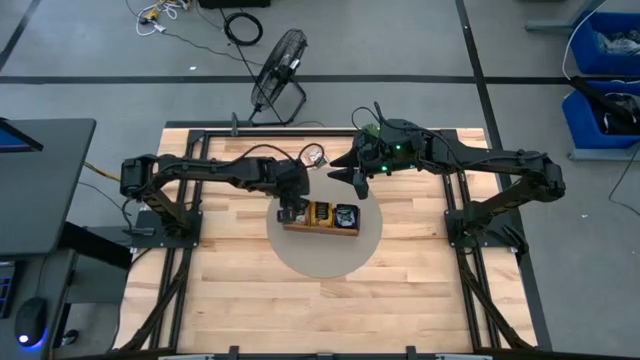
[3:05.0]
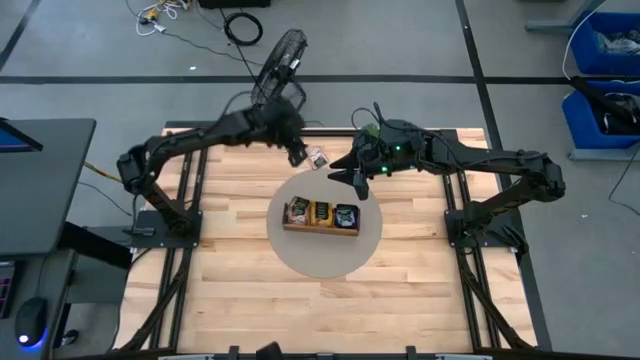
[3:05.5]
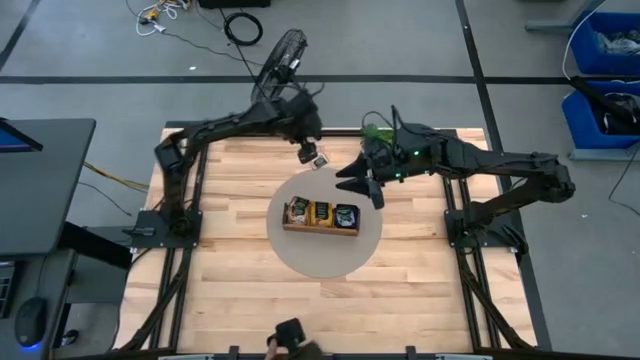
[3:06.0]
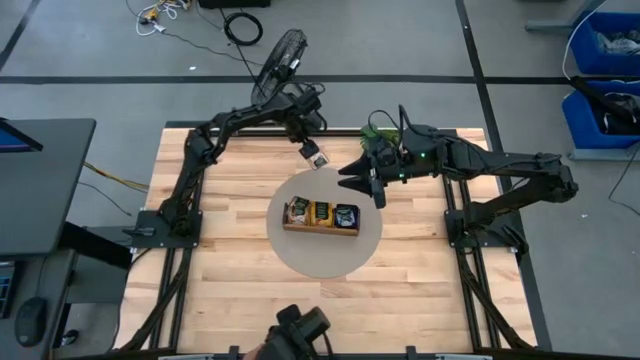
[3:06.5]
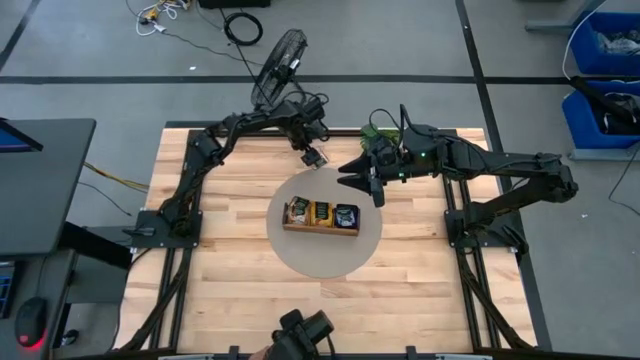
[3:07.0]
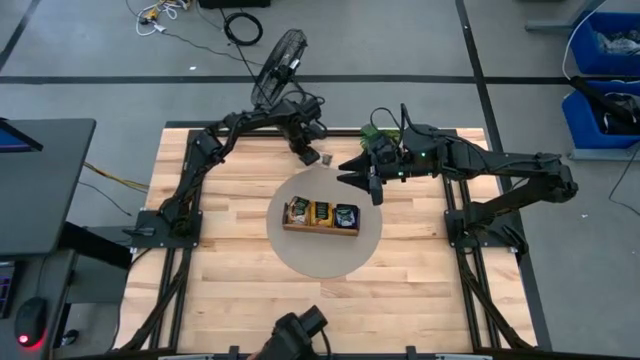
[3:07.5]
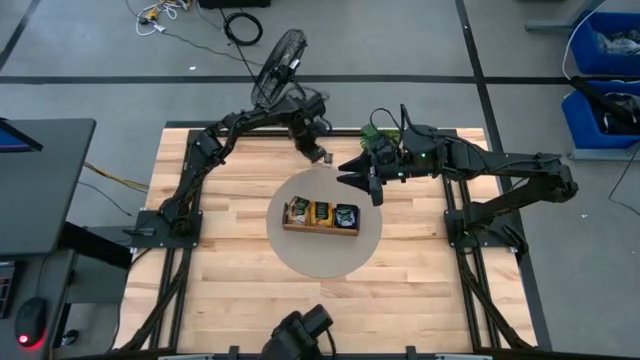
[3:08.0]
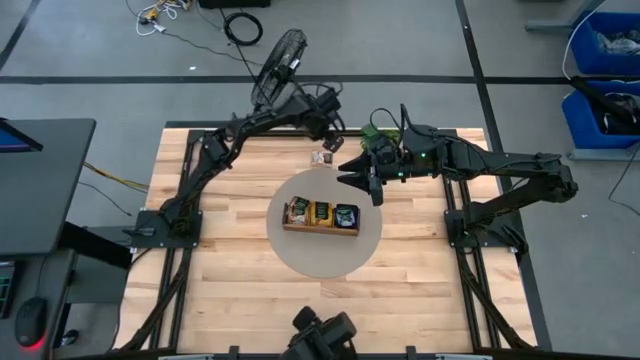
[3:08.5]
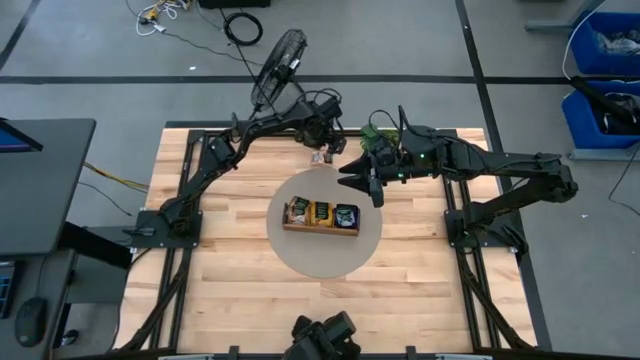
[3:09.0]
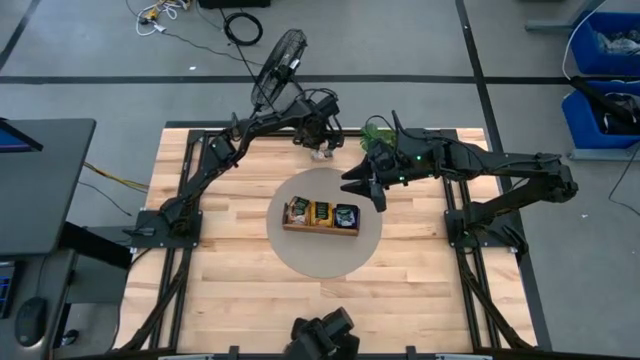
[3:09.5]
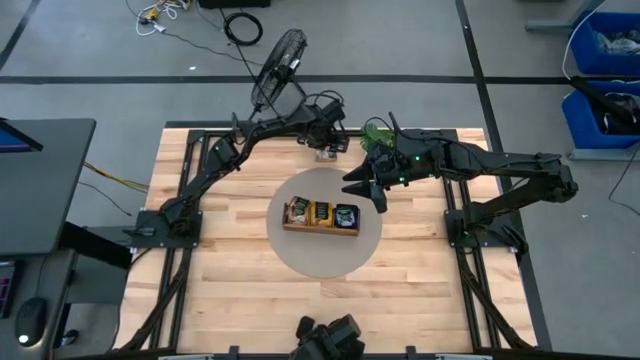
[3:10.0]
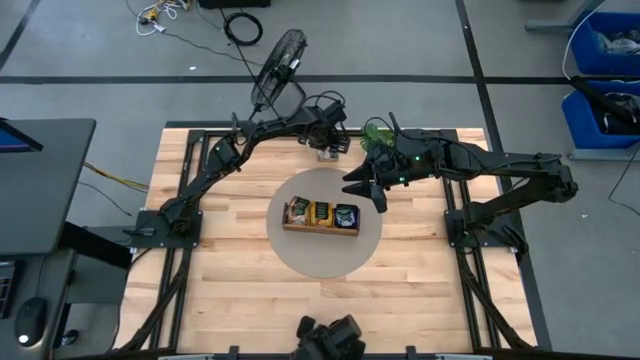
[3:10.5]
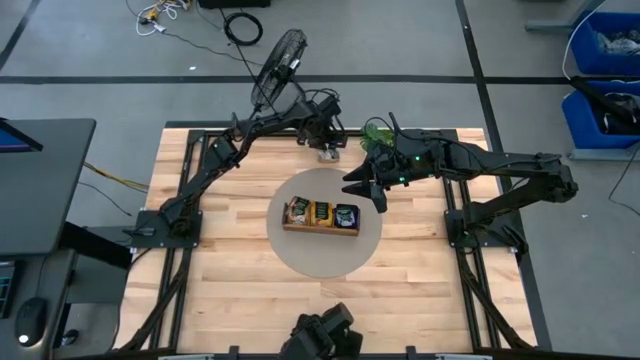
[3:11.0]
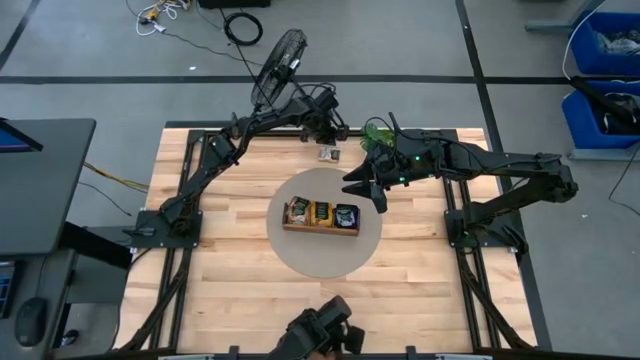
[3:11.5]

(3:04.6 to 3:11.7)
Task: Pick & Place Tea
Put the brown tea bag into the left section of the wooden organizer

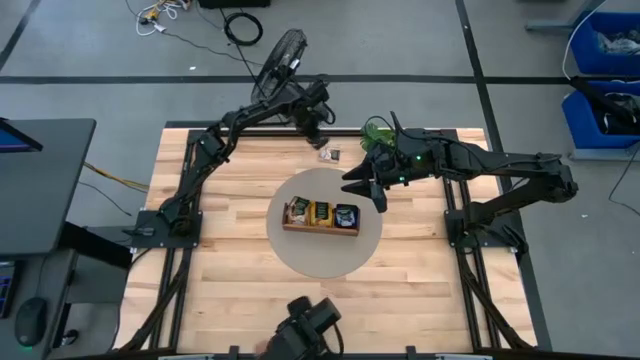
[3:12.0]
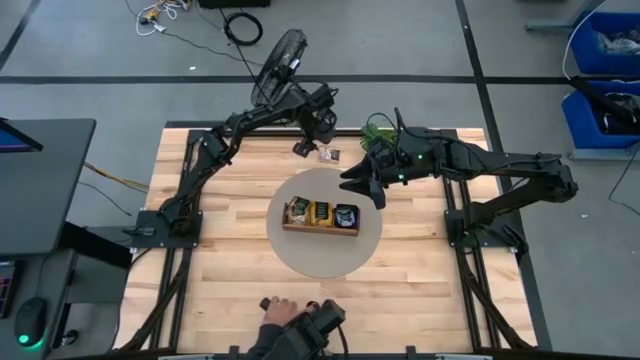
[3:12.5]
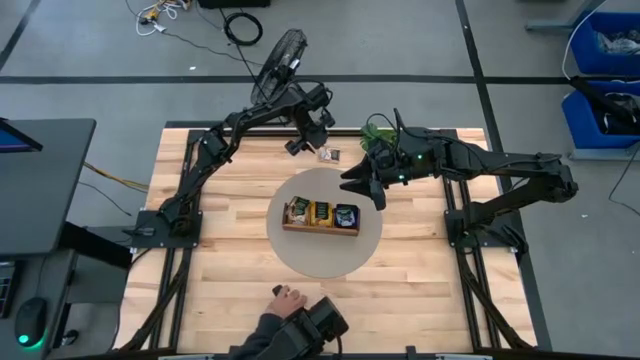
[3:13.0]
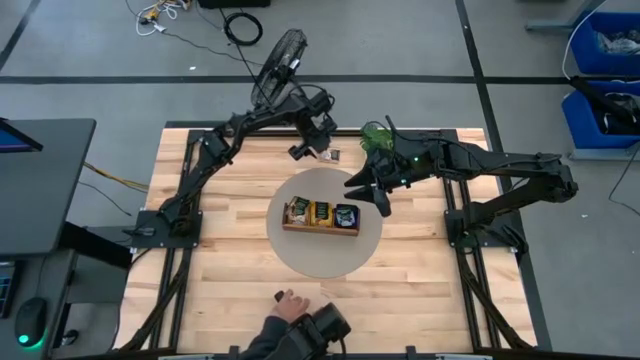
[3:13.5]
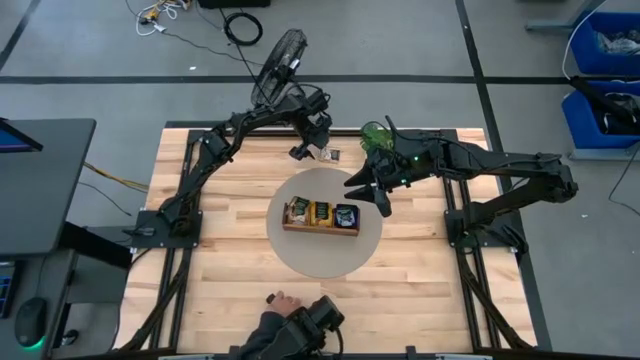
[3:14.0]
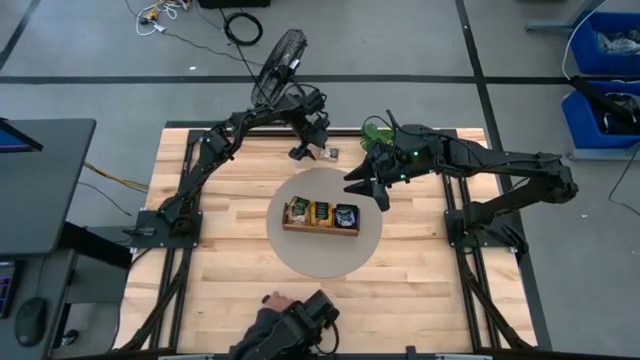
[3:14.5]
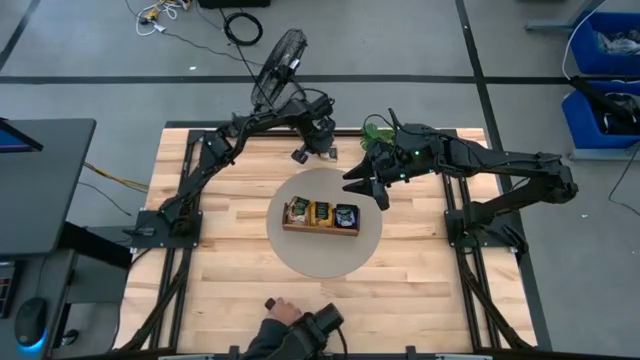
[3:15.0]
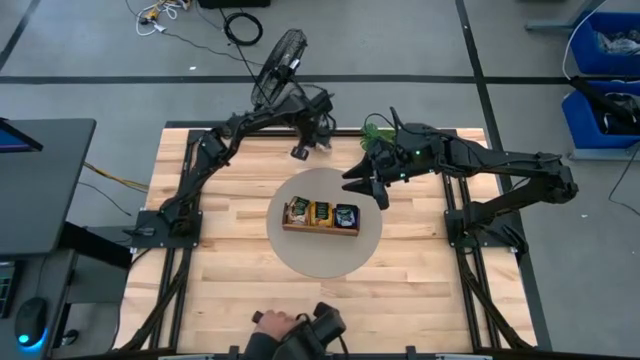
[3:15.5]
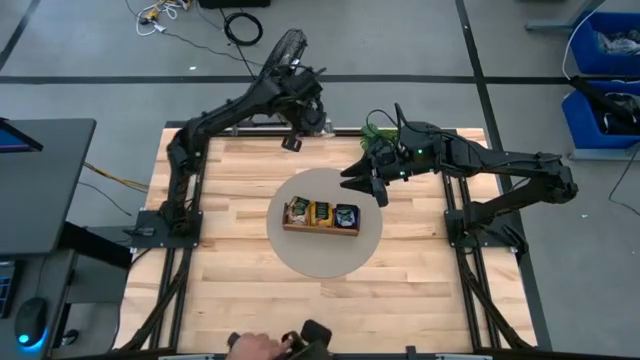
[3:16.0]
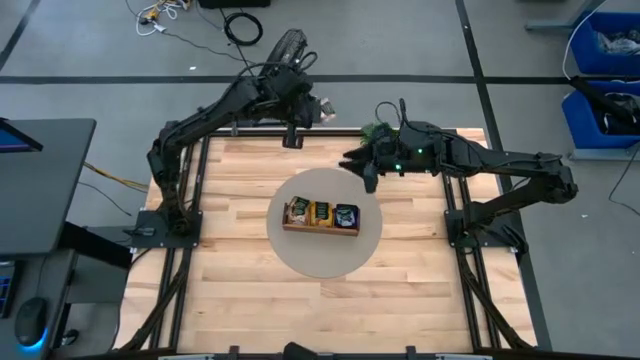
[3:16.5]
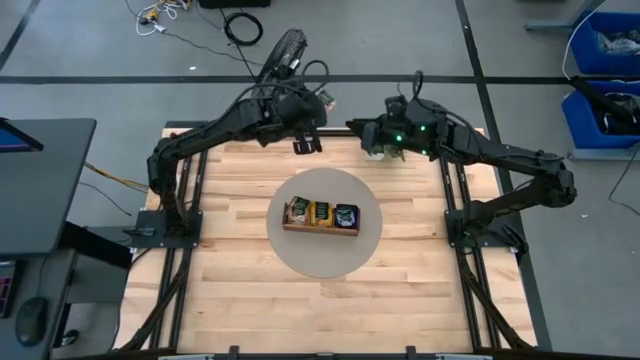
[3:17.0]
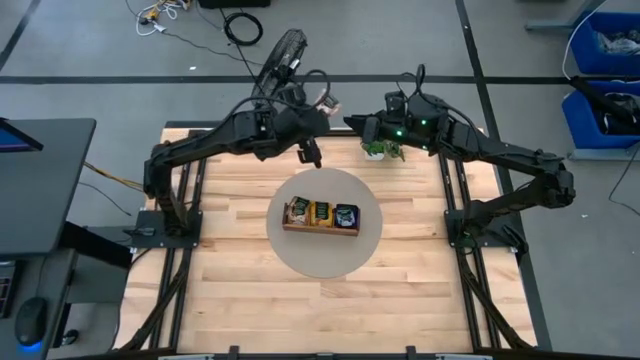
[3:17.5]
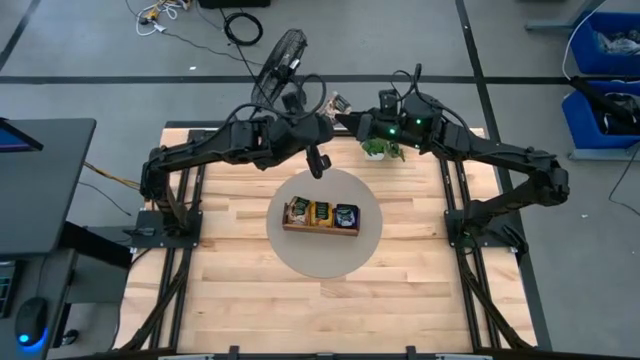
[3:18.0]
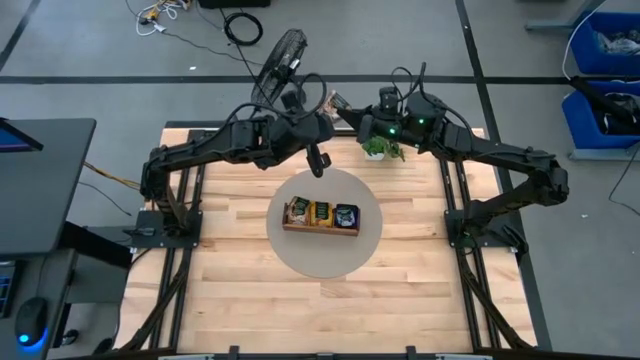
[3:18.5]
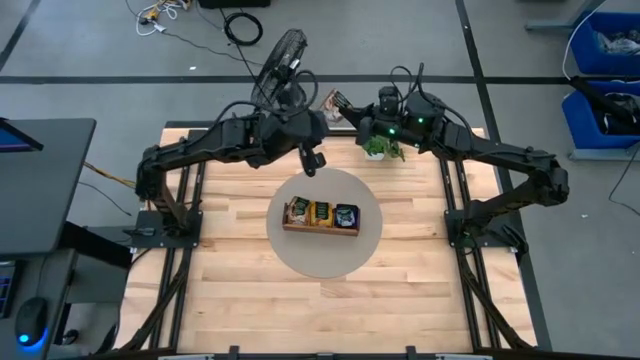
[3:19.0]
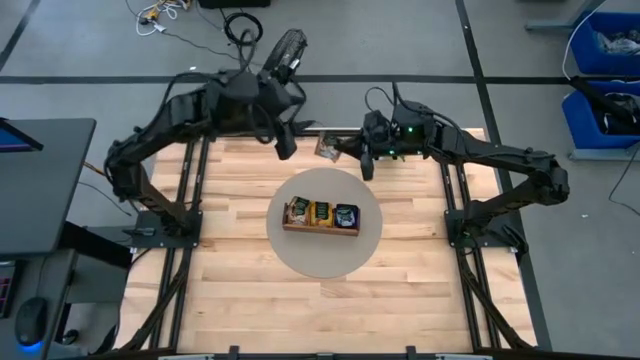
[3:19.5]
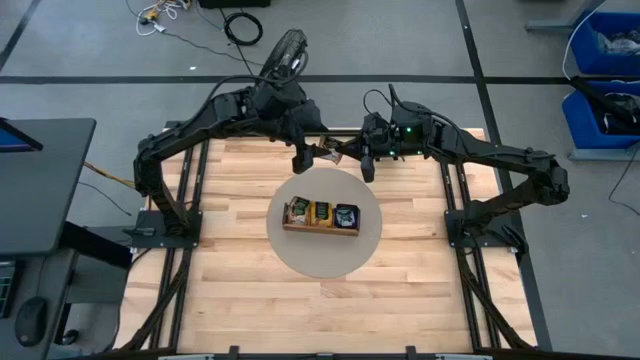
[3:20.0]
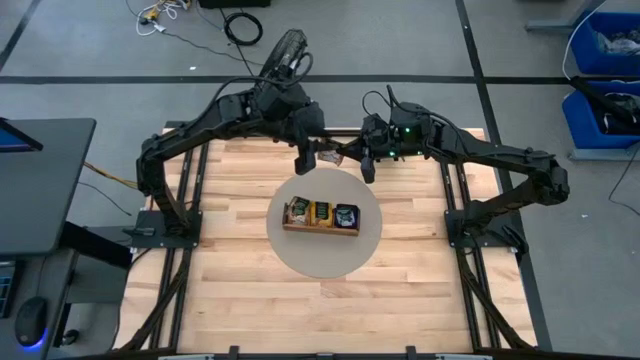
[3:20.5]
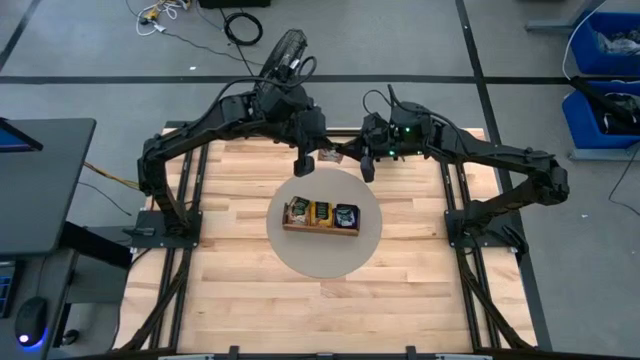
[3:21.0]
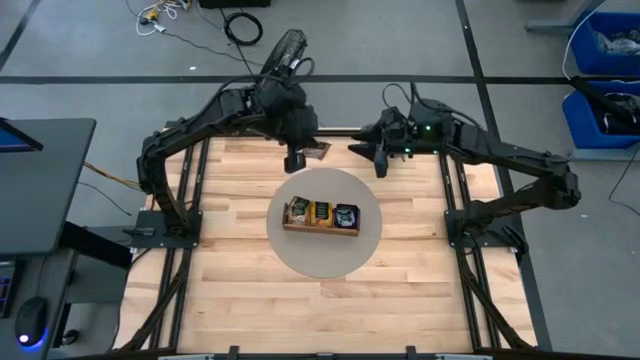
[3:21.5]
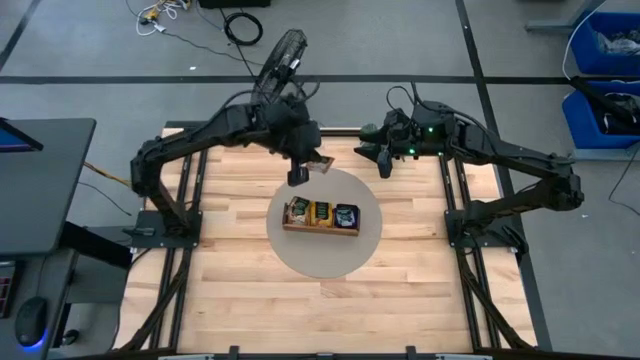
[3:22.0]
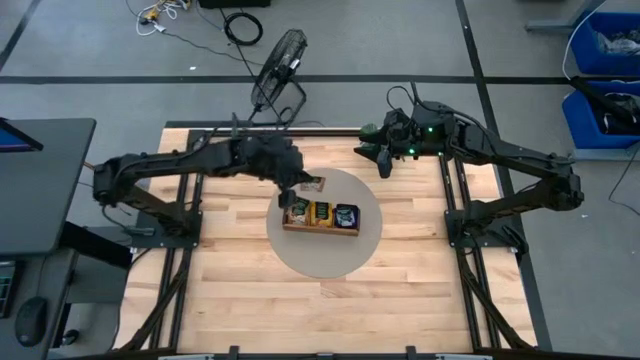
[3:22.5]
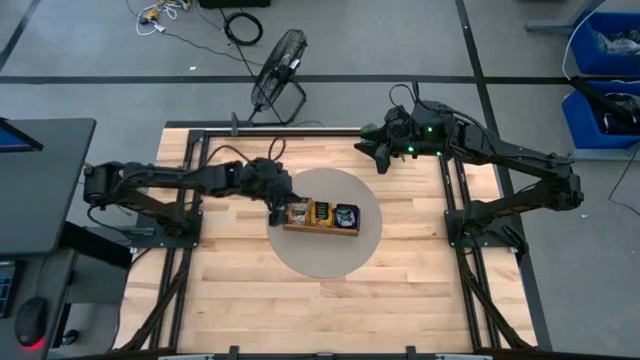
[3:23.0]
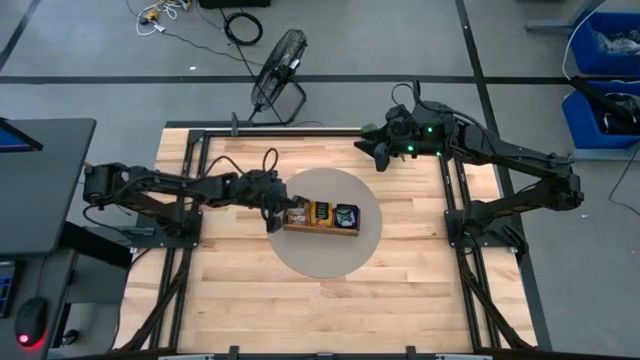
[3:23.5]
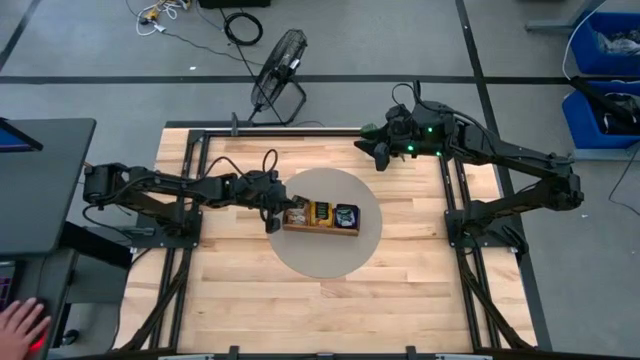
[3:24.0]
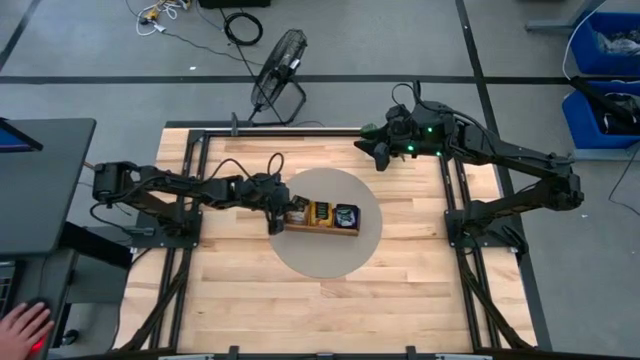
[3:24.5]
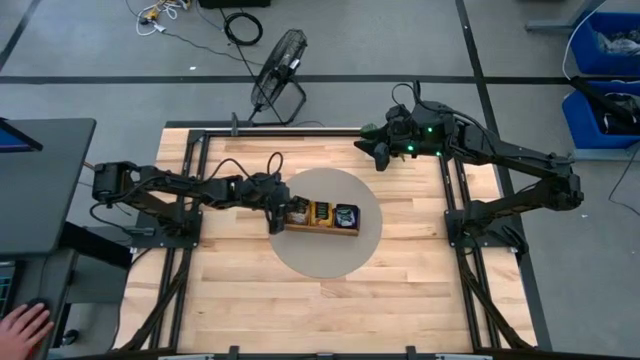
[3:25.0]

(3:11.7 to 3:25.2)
Put the brown tea bag into the left section of the wooden organizer
